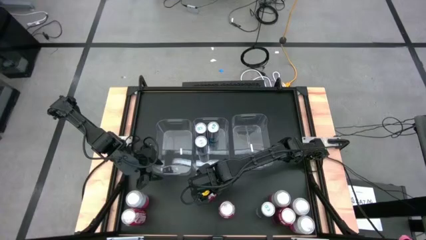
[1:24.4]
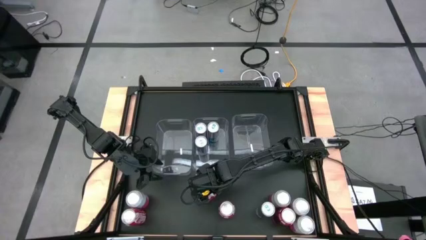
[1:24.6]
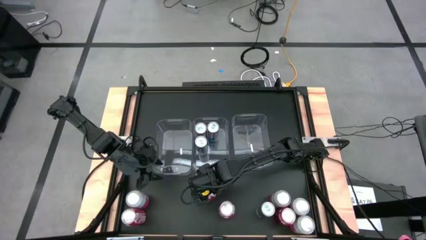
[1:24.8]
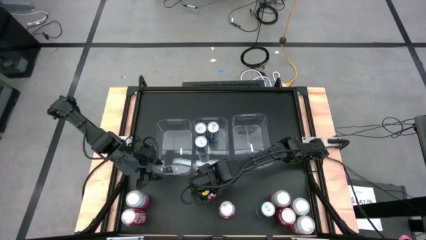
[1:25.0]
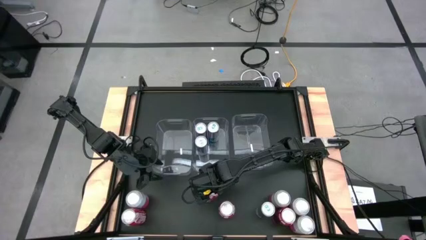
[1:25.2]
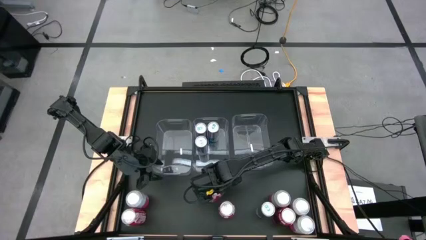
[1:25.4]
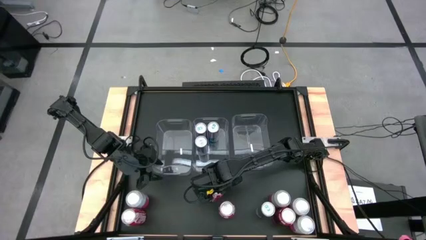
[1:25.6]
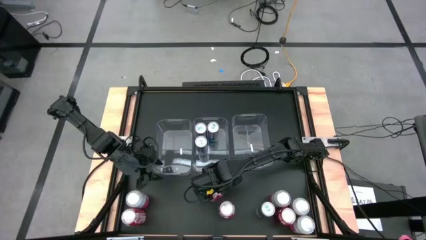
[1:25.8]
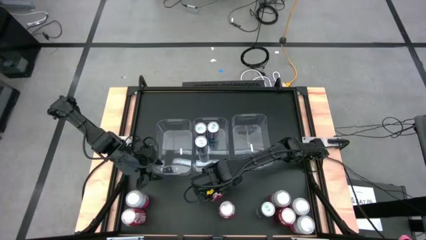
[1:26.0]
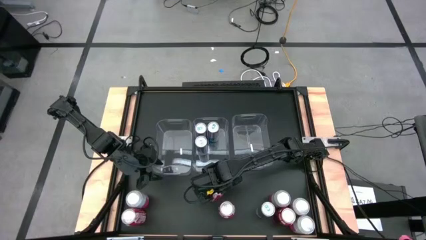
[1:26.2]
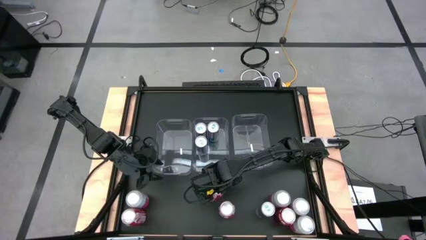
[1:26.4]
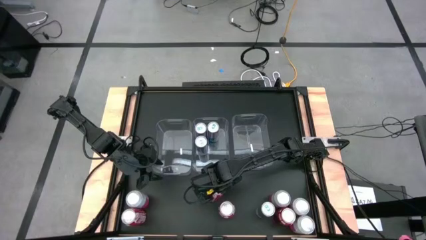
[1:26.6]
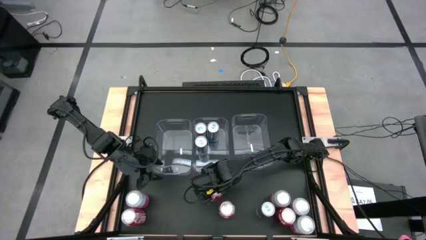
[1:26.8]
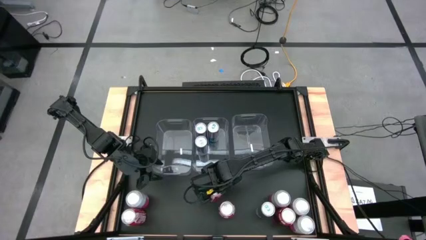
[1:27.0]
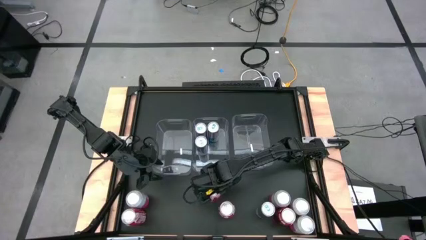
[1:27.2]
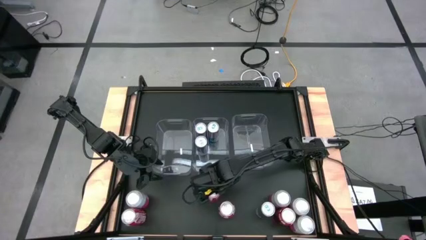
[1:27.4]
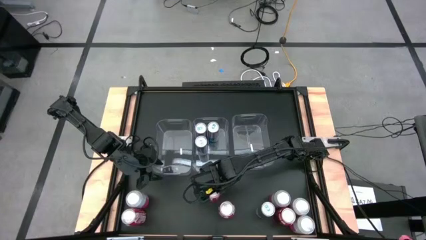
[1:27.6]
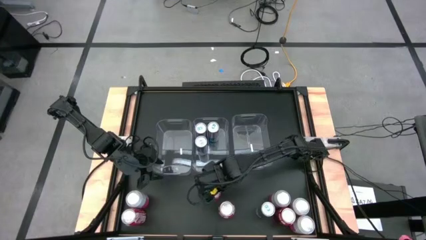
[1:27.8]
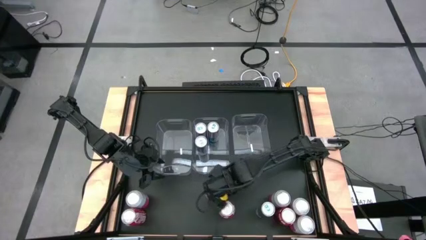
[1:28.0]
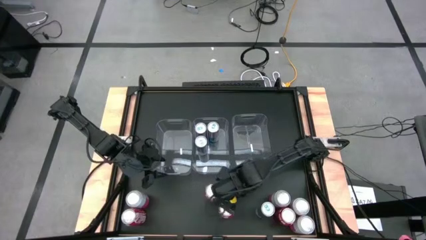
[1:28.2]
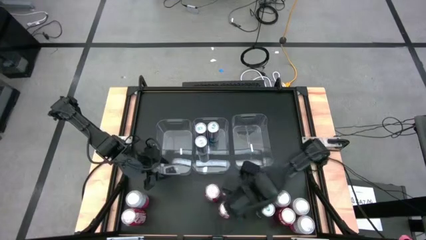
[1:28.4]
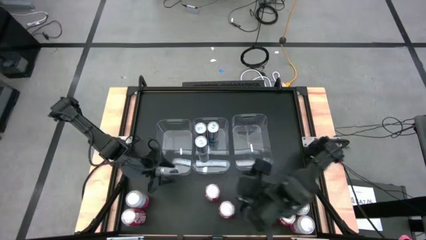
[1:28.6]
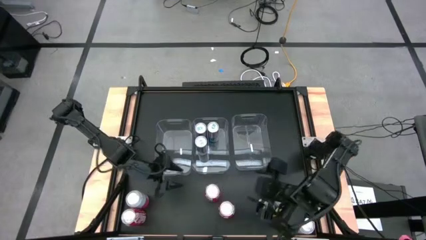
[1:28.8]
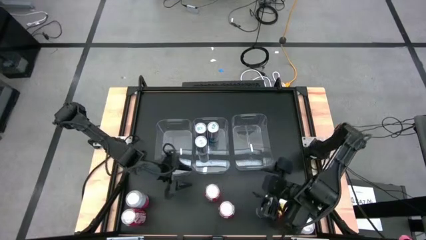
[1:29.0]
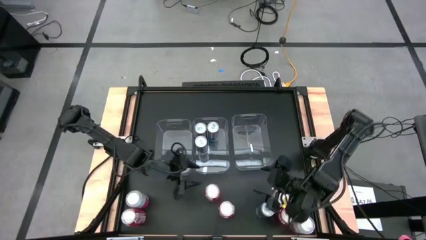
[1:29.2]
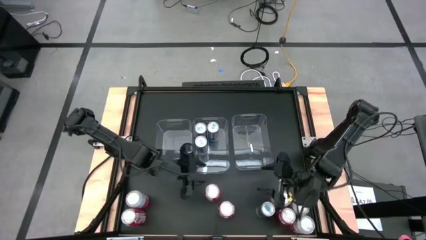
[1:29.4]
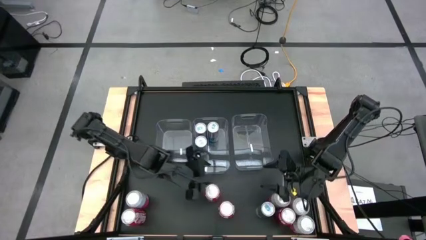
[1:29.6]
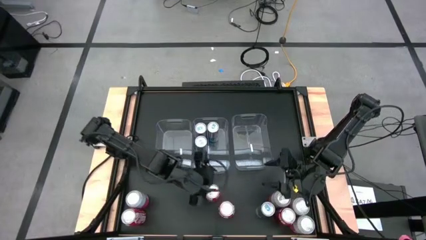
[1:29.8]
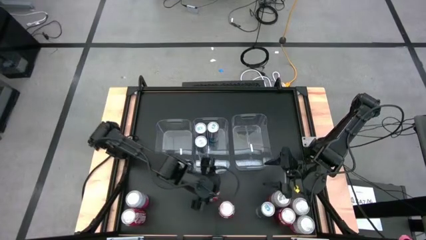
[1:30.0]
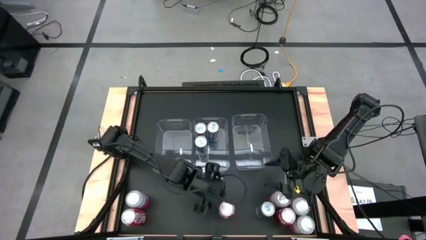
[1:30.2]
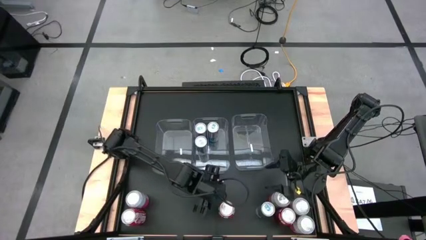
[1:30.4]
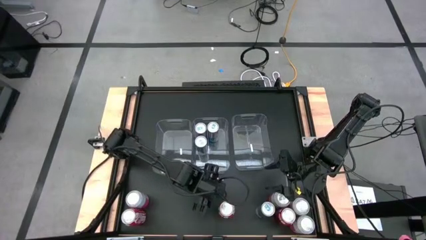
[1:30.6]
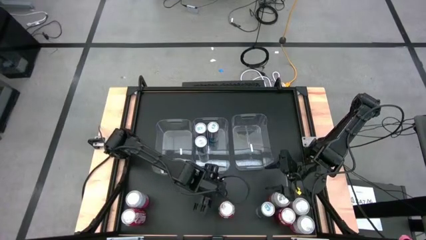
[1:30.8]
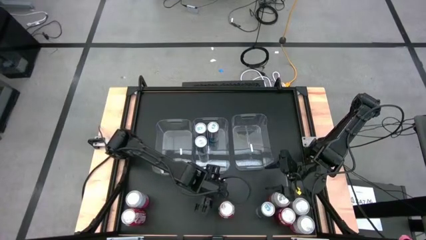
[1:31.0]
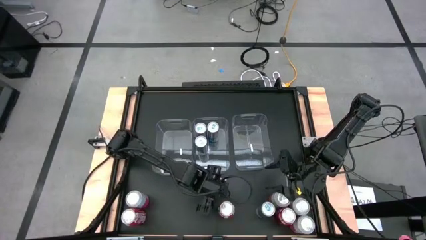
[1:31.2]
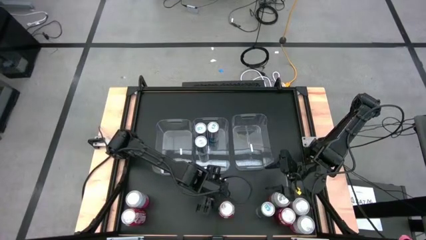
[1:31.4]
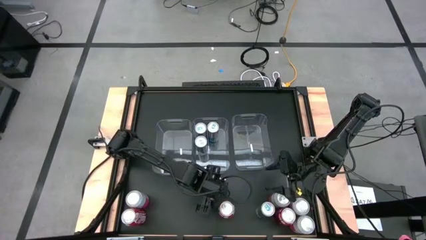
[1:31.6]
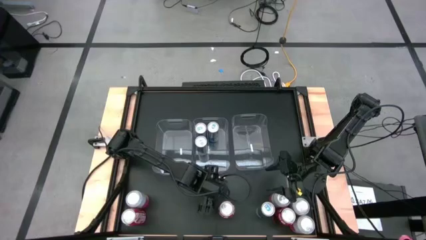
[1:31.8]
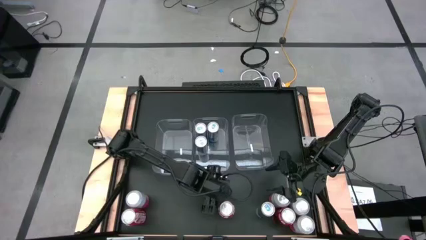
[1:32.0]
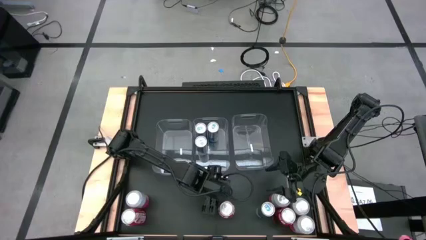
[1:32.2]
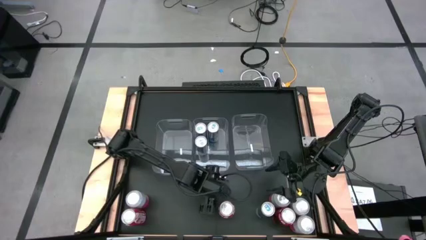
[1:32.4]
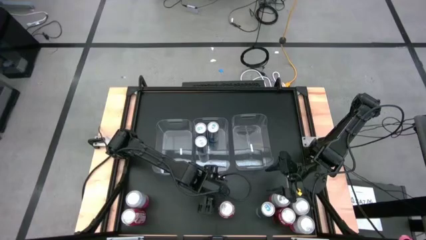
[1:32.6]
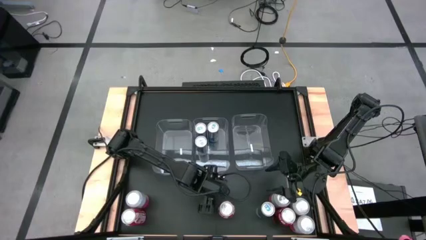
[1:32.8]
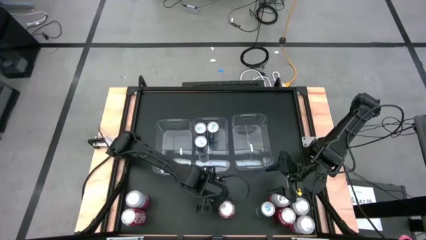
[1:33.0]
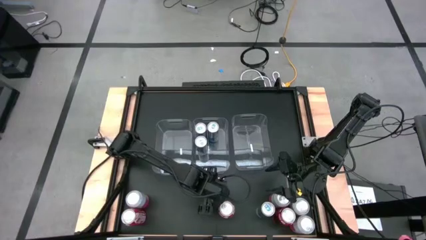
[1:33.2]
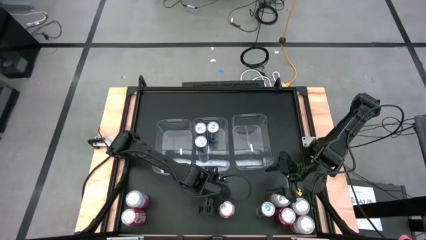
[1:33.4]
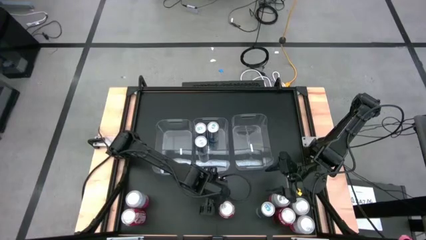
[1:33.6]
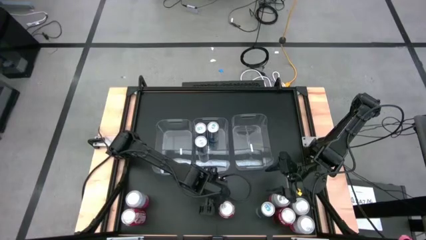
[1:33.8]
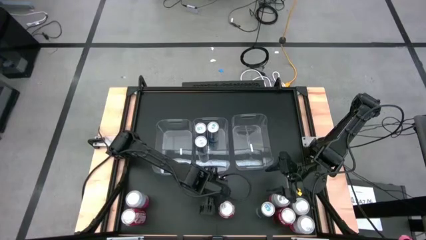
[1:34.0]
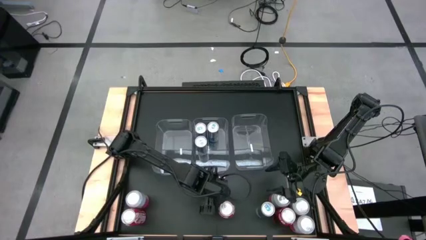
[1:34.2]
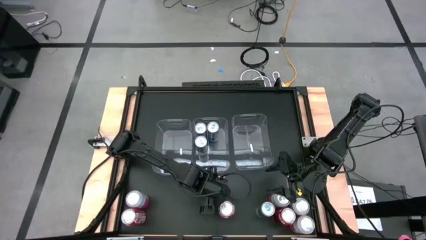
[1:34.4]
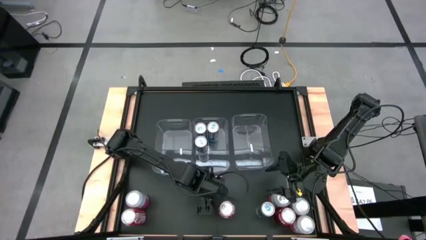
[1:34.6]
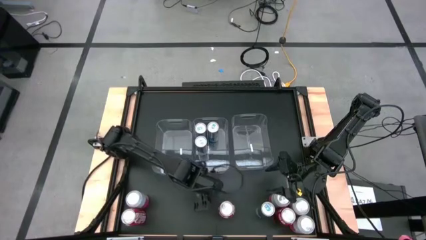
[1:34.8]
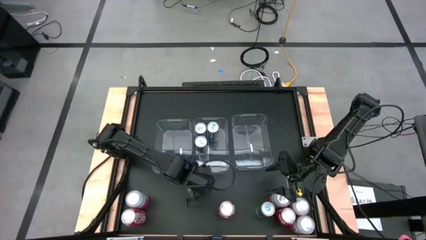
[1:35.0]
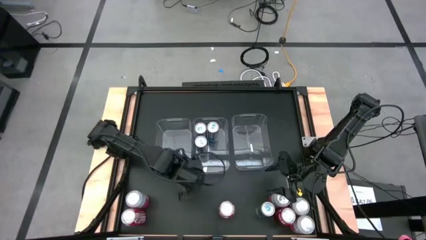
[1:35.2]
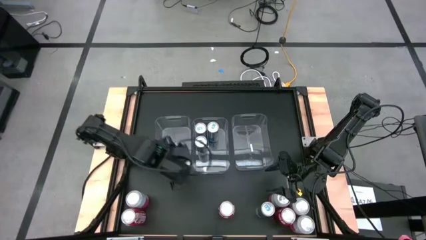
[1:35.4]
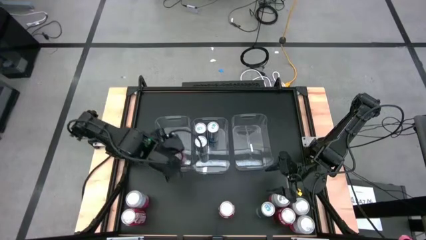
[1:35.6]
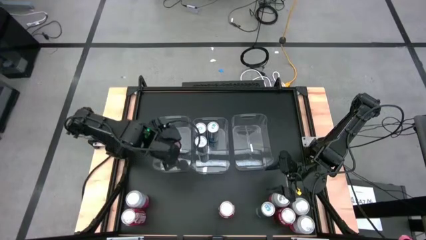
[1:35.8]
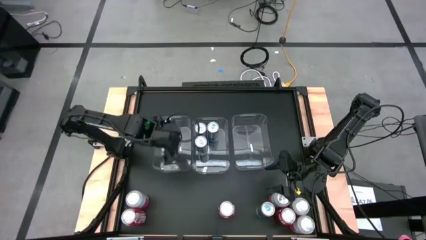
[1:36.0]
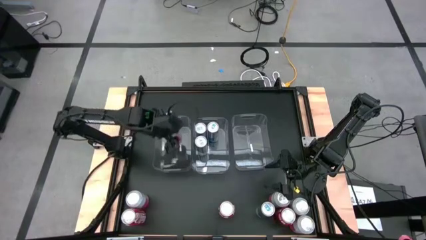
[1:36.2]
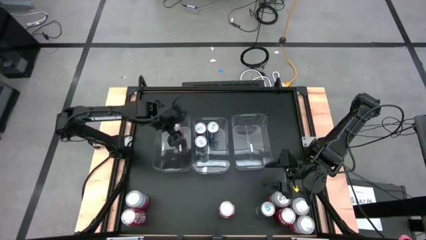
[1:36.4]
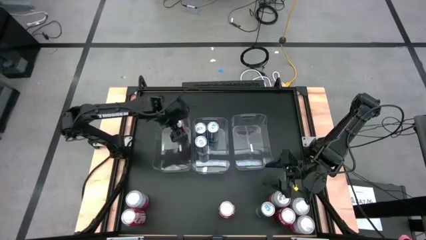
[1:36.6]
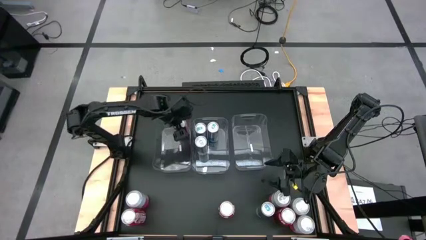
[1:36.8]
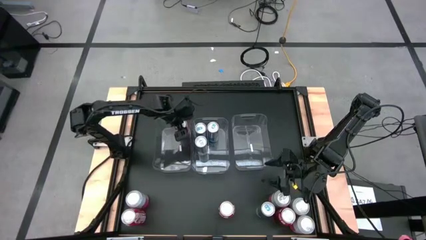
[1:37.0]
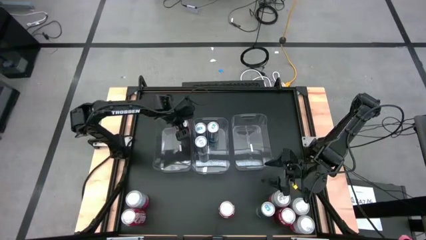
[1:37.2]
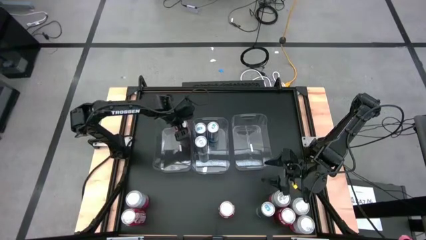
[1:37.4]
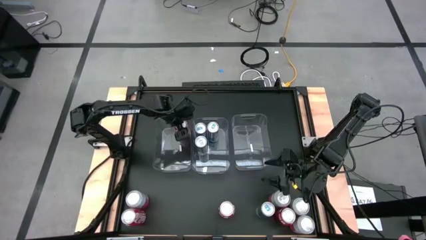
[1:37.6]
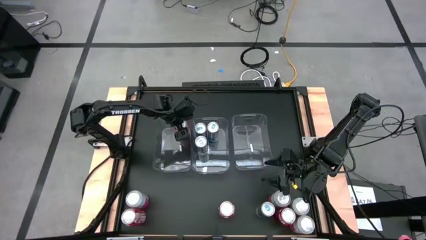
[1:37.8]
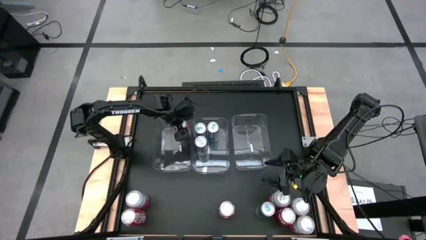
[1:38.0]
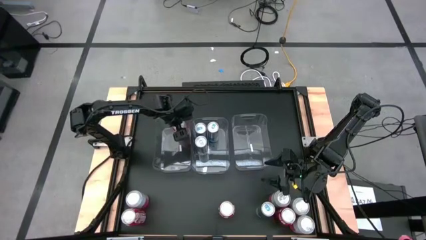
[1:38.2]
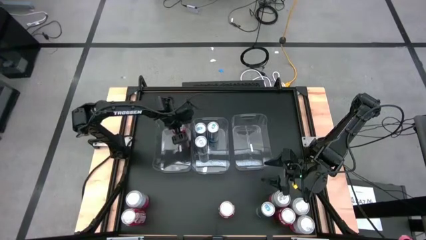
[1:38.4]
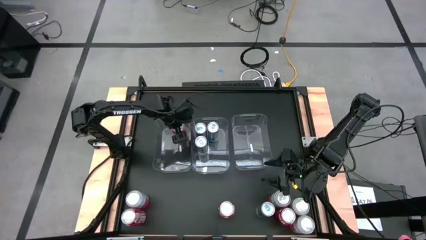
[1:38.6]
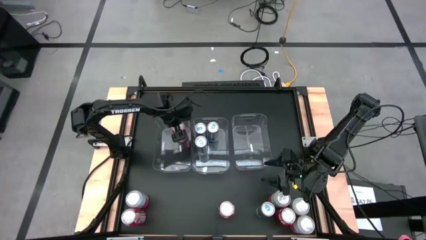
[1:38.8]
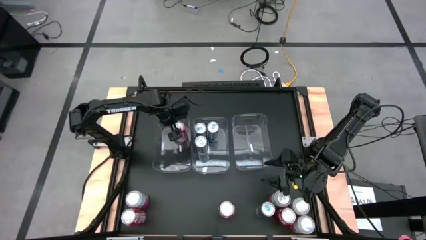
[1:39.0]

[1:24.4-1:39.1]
Task: Sort soda cans
Put the red soda can into the left transparent bin

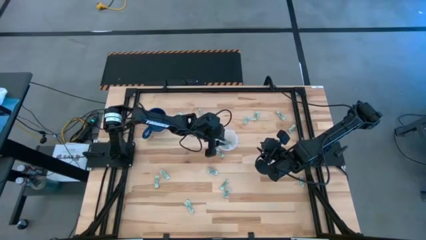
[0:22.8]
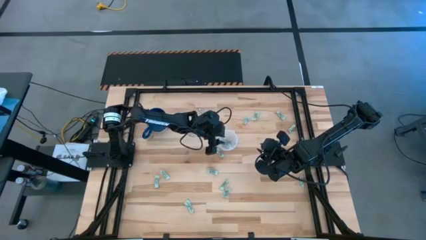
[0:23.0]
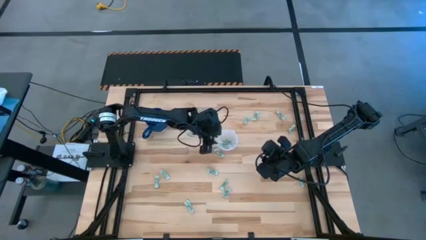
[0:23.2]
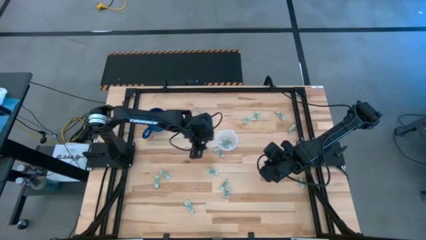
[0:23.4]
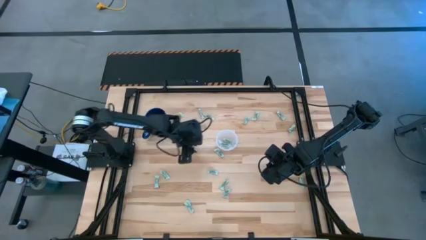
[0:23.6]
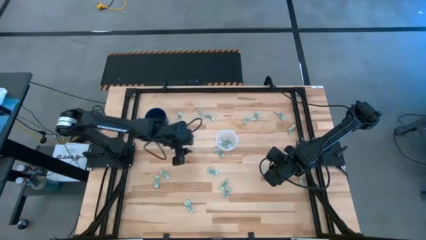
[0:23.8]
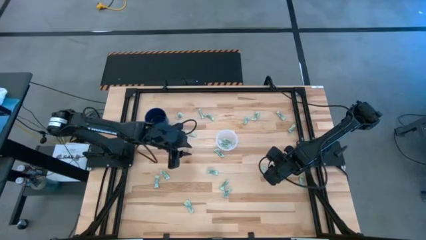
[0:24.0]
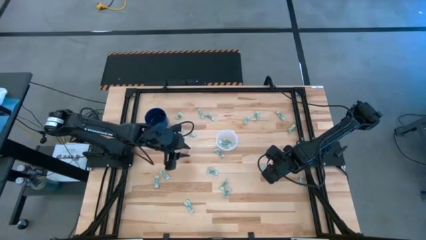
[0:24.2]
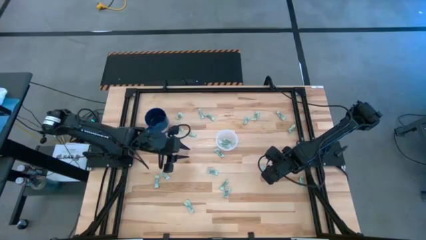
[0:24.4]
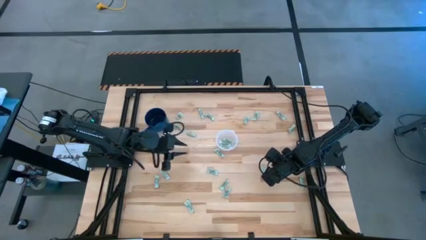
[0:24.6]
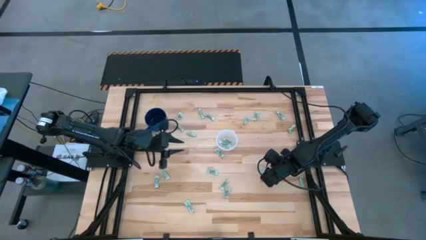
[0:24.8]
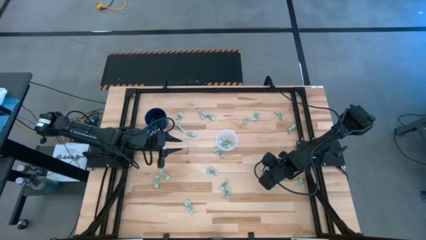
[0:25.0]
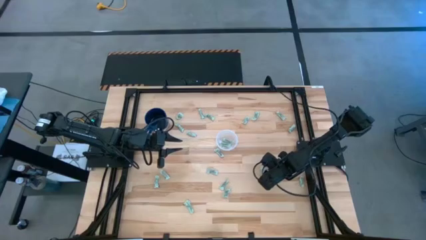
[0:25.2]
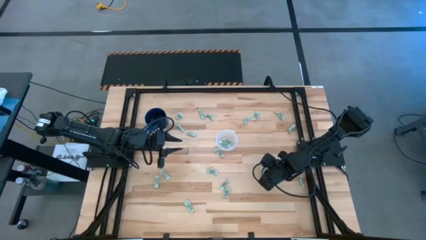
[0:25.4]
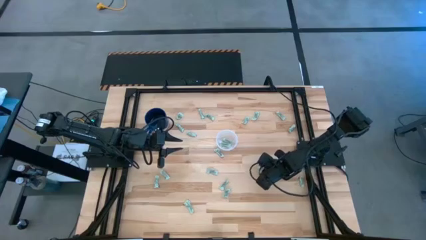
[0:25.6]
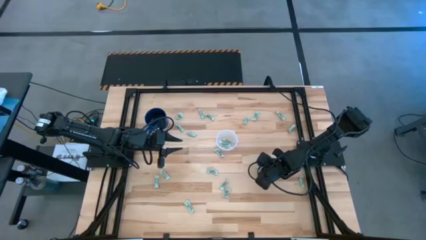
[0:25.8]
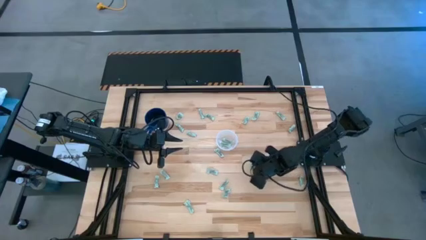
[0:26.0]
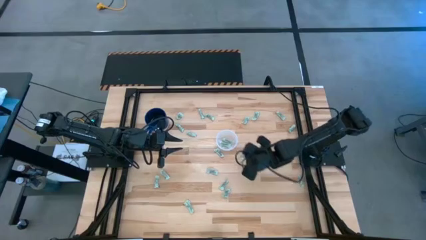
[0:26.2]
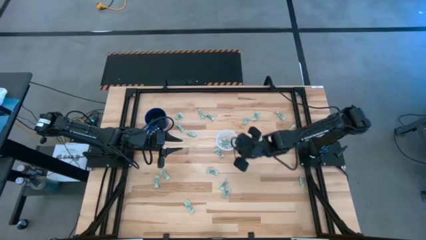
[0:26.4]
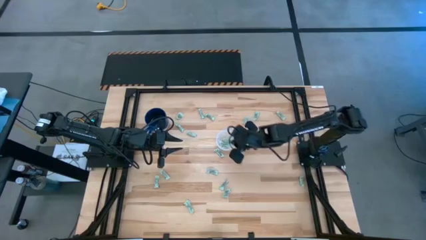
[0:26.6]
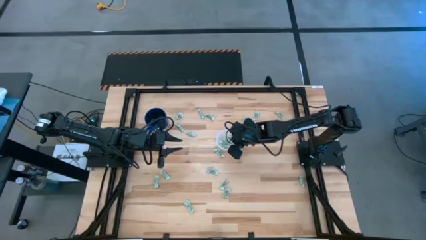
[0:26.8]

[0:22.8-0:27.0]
Task: Pick and place items into bin
Put the gray stevia packet into the transparent bin
